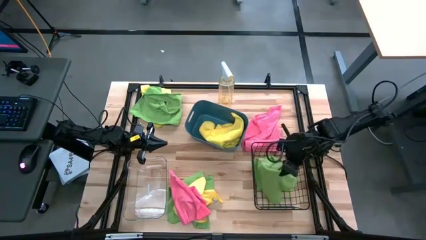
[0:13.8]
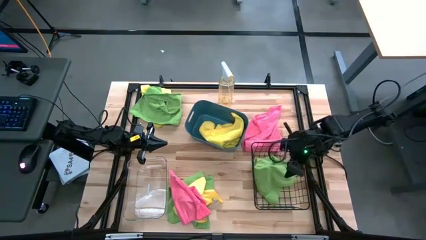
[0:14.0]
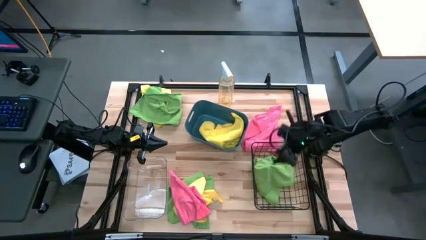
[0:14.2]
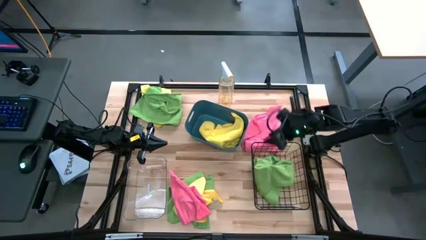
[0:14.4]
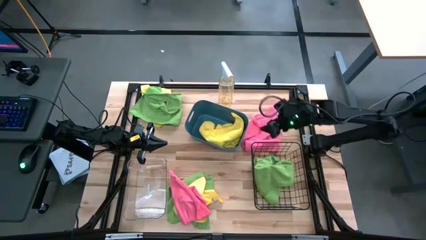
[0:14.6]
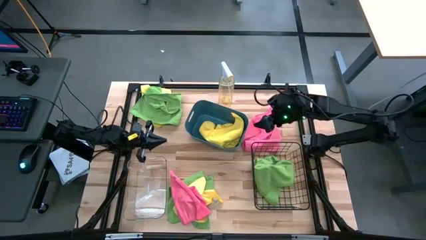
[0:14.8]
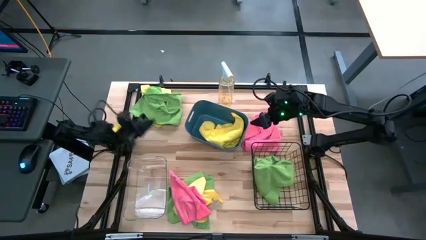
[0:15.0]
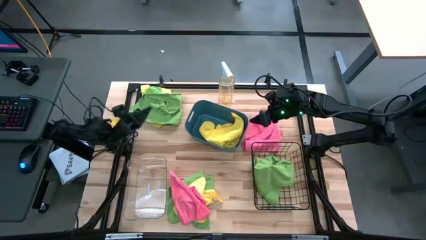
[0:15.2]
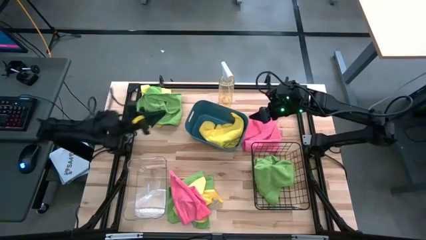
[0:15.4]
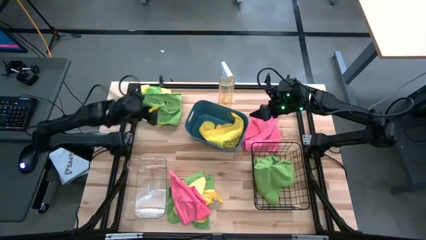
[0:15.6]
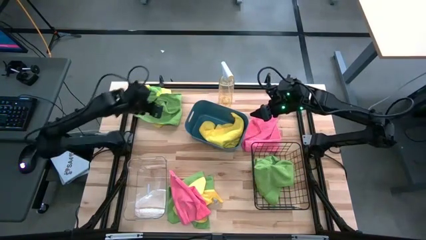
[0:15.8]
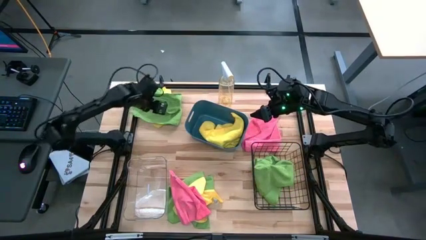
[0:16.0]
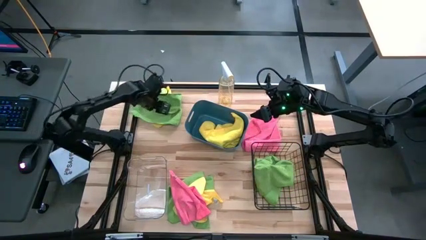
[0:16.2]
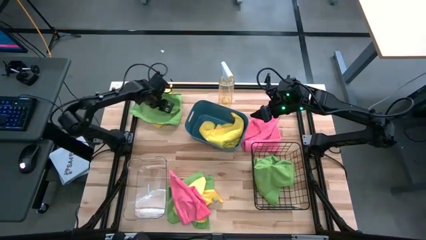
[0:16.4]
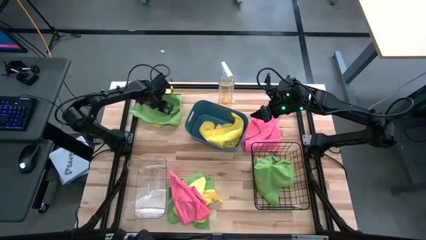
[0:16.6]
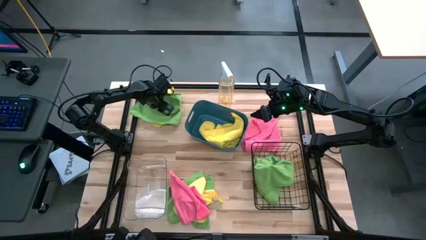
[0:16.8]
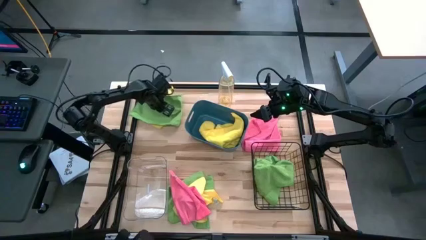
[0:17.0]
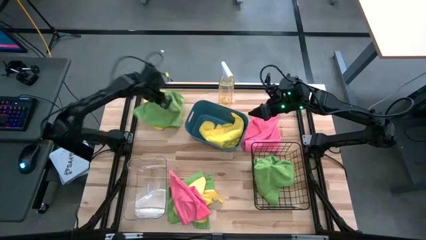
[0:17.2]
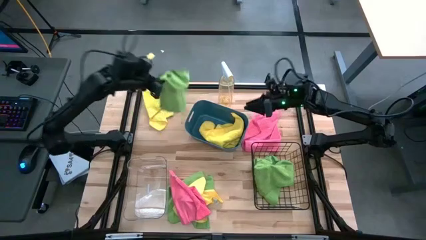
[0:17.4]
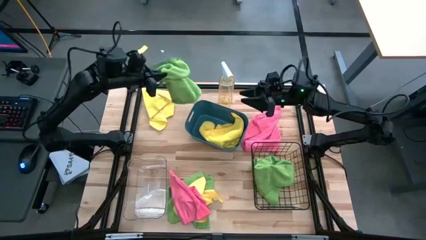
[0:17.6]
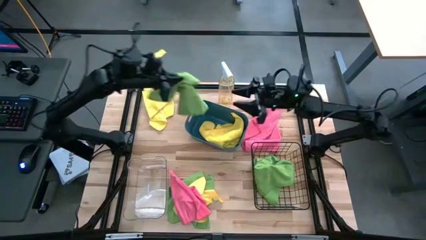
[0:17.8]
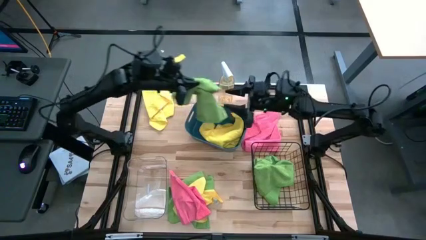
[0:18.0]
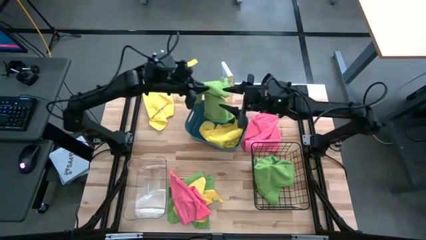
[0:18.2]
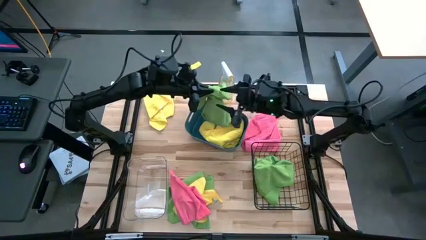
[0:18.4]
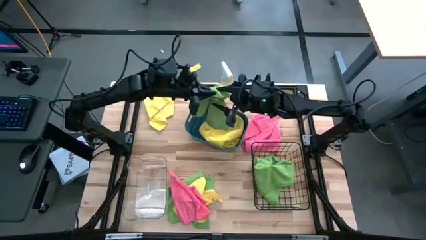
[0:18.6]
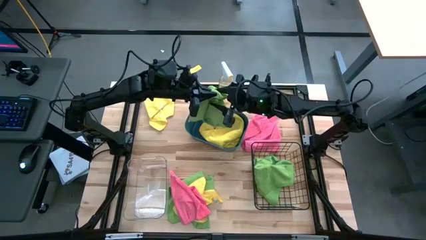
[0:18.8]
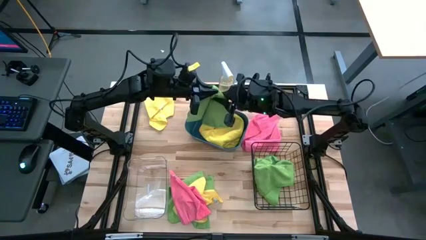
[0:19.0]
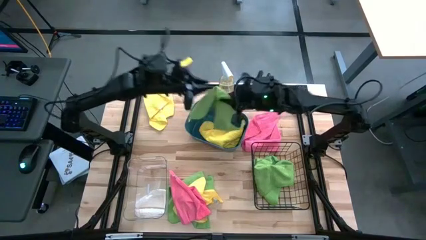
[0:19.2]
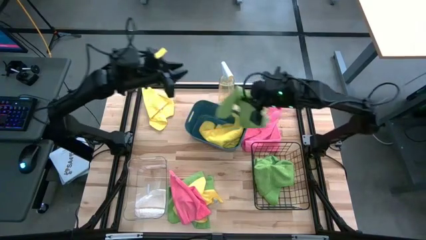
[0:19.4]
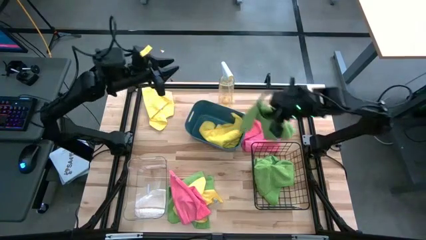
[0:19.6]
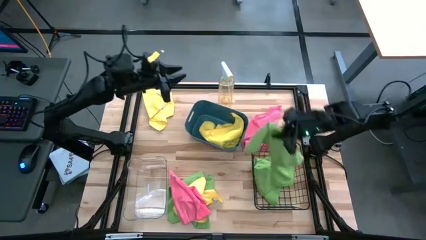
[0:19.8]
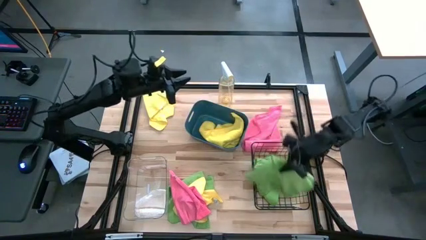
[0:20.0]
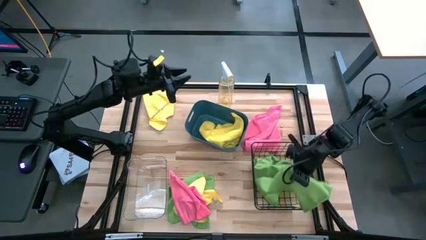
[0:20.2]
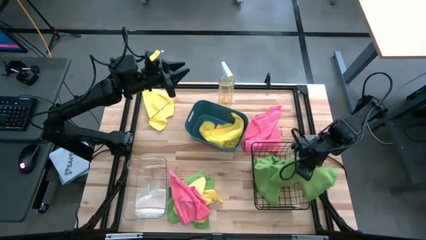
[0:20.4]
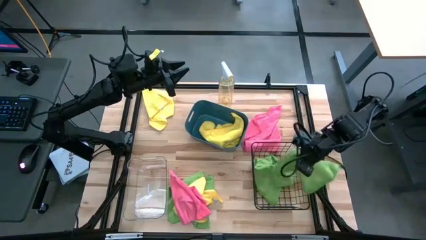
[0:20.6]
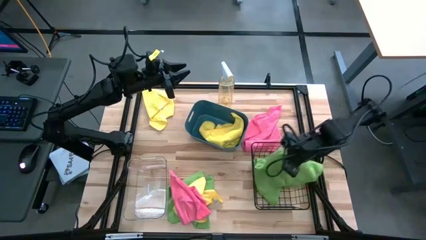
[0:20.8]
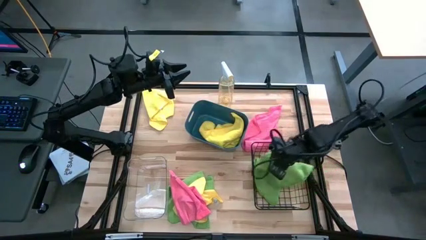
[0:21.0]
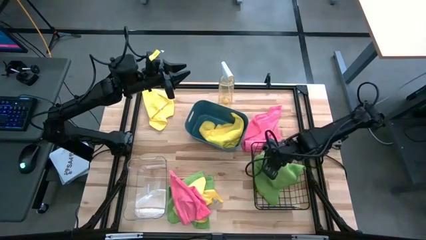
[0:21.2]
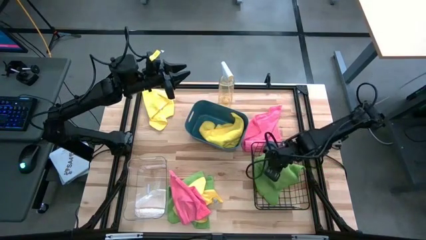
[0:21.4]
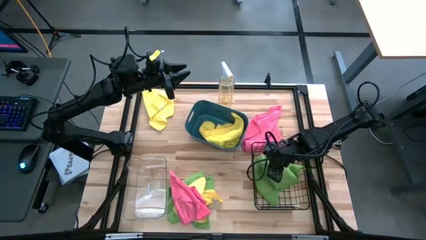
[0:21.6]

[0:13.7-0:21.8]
Task: Sort microfiber towel by color & place in baskets
Put the top green microfiber cloth into the black bin

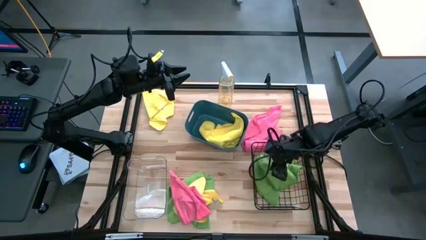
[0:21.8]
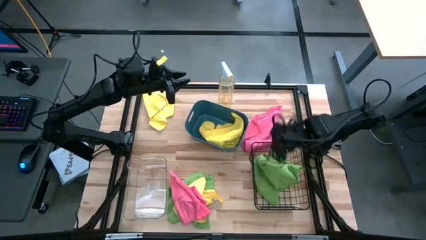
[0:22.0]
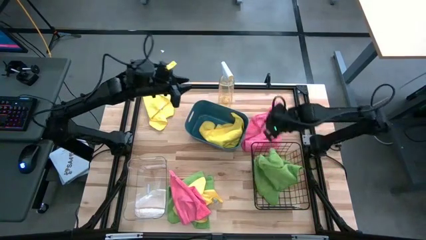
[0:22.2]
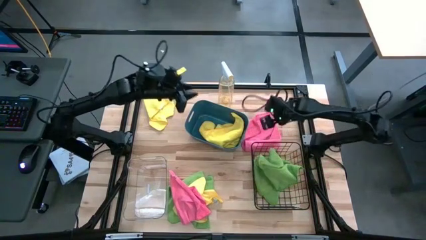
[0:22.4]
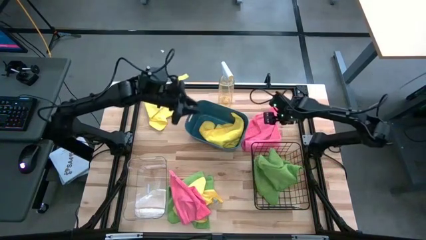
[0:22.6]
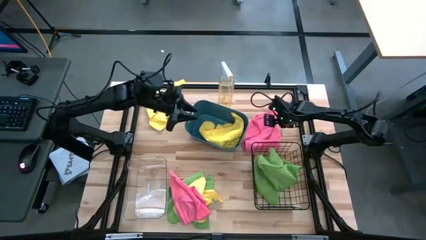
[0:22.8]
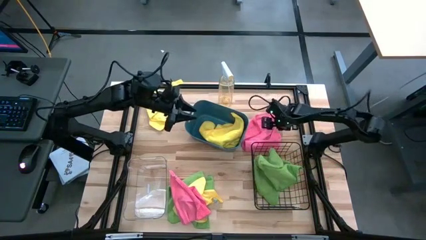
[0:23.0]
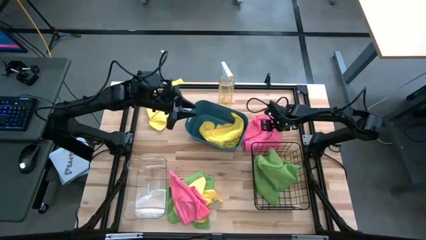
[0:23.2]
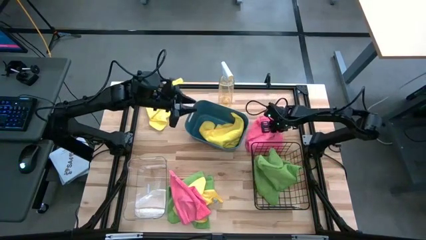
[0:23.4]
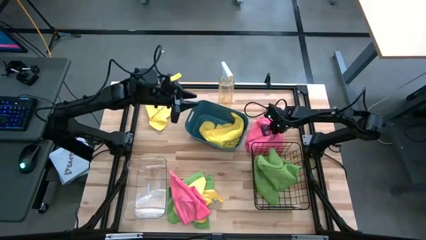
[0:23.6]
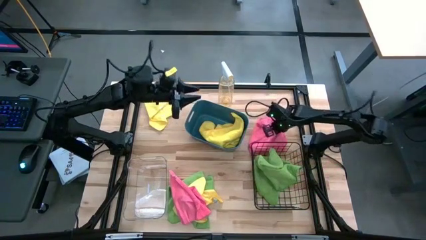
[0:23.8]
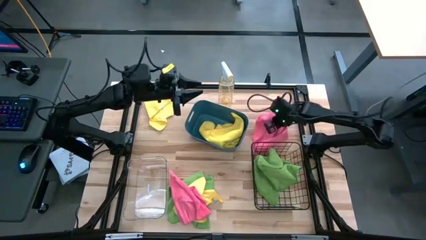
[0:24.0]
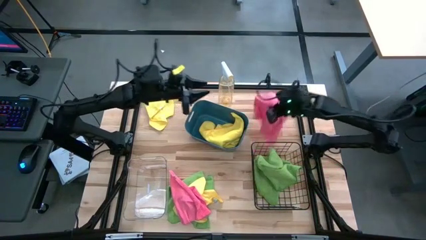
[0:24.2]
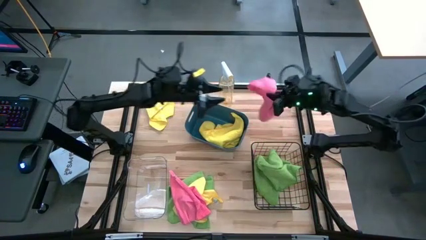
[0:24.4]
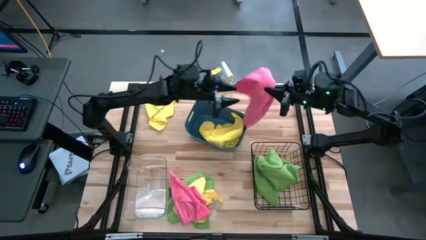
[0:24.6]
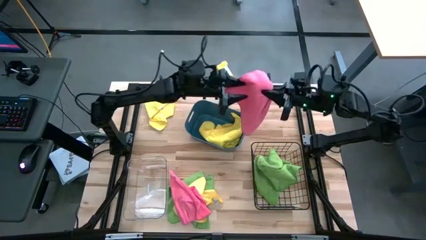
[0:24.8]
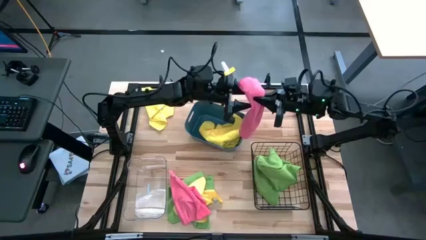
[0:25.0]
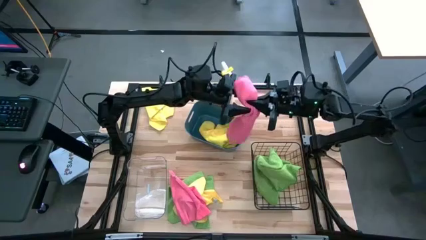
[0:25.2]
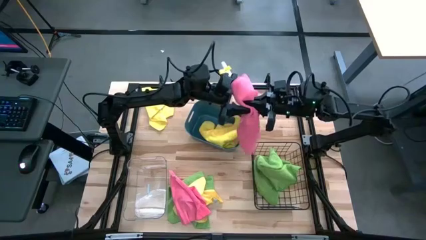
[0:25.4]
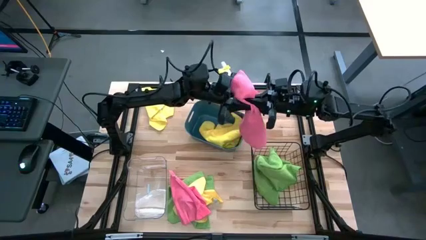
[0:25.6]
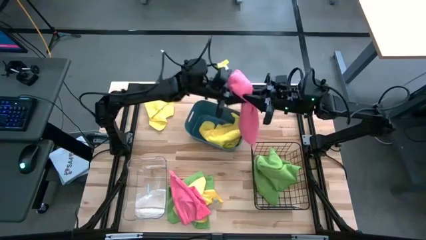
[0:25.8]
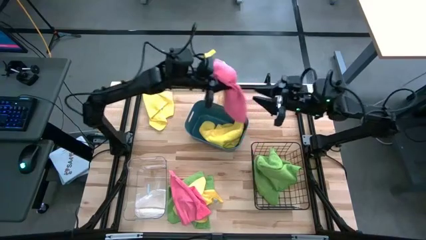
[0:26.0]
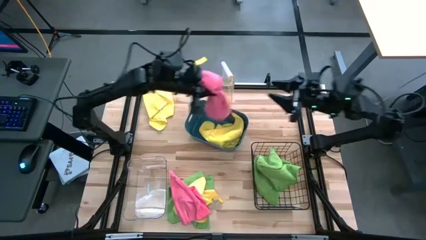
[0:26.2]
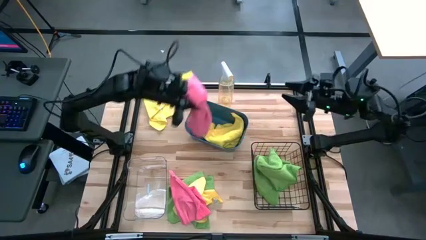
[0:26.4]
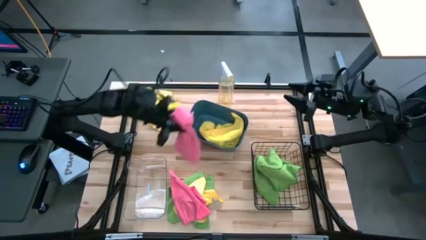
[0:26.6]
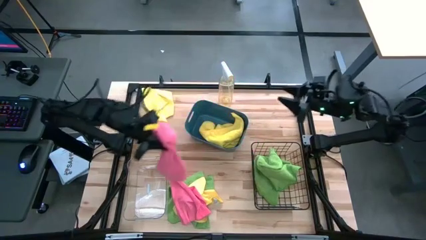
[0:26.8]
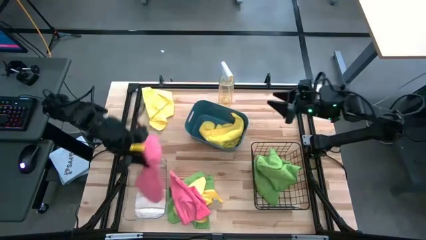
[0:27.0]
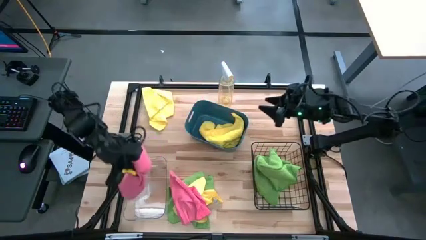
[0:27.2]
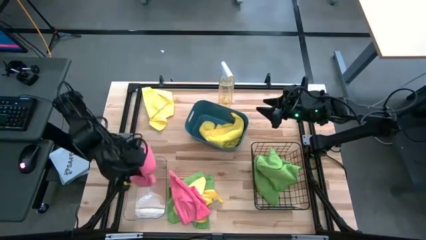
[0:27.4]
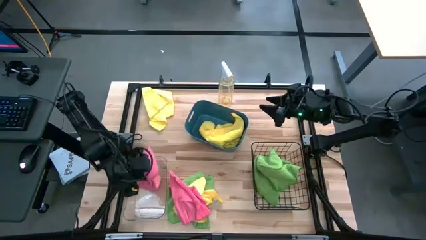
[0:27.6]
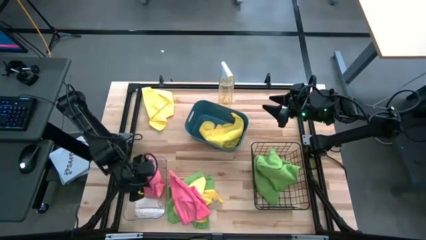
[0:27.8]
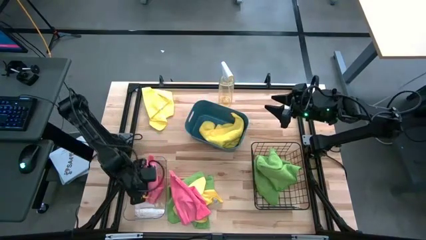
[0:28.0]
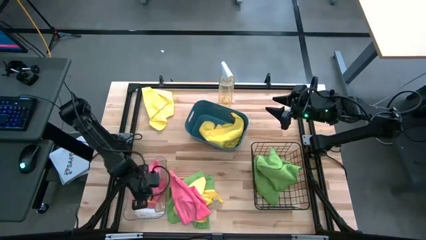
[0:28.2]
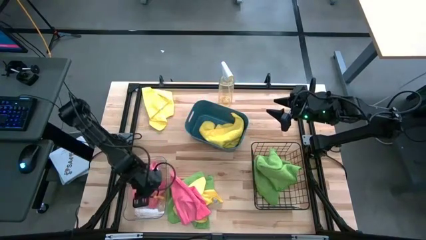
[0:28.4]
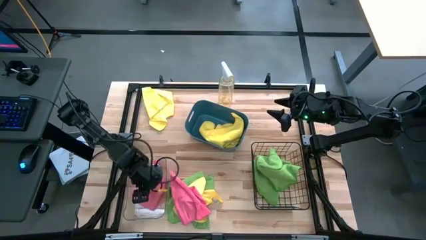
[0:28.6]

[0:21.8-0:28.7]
Put the top pink microfiber cloth into the transparent bin

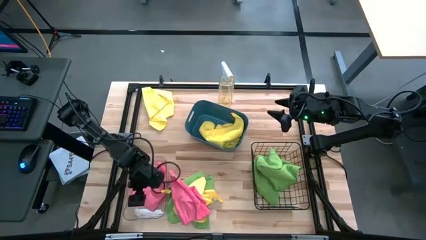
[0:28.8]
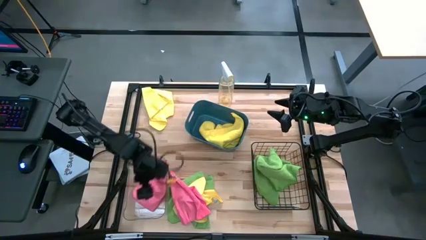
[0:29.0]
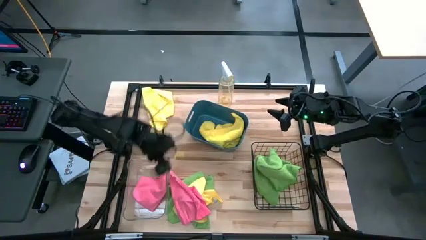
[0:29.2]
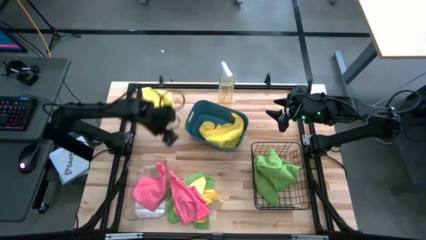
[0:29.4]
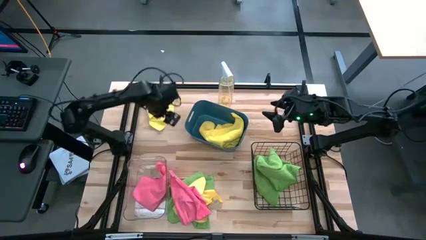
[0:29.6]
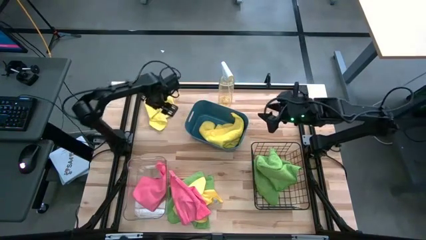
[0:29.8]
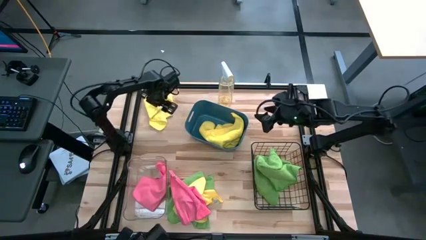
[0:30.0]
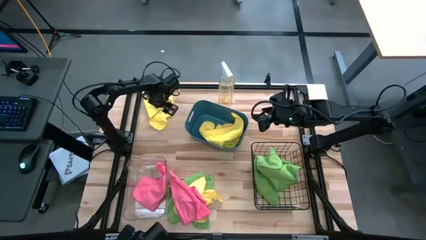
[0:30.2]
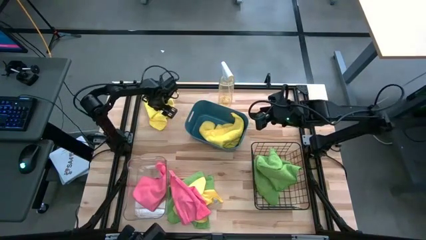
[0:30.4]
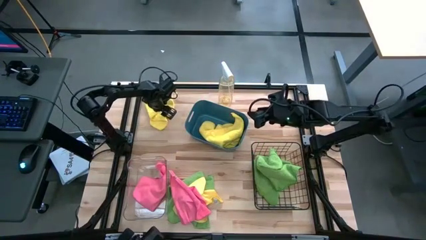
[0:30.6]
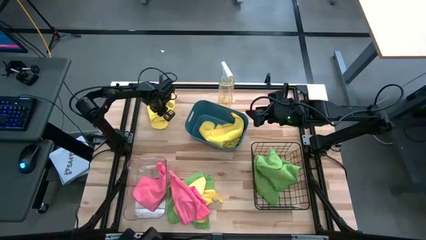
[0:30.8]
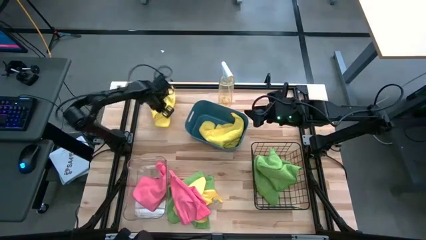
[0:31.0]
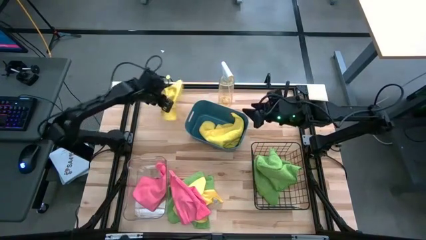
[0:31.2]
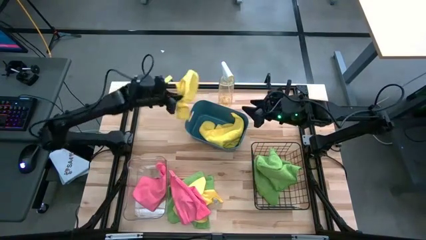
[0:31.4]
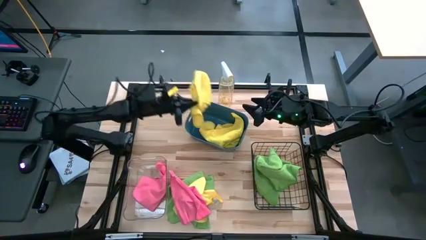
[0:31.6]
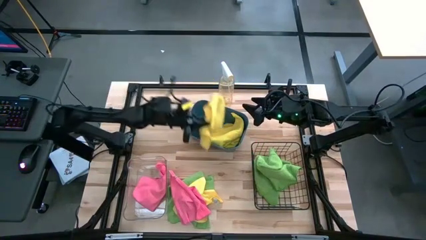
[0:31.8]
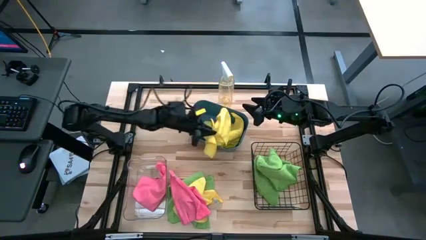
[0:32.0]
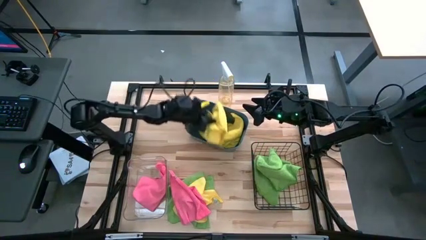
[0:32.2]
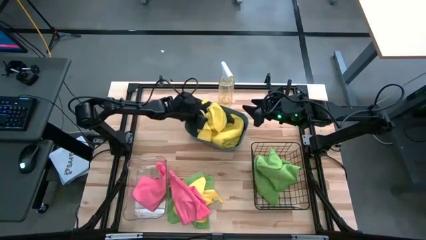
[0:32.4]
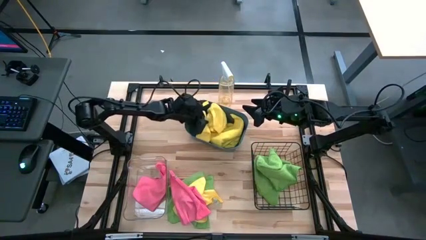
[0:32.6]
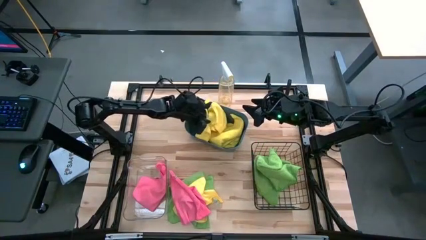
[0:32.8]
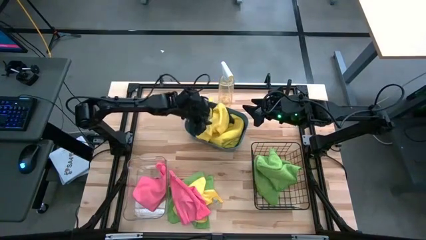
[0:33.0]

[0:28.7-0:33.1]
Put the top yellow microfiber cloth into the blue bin
